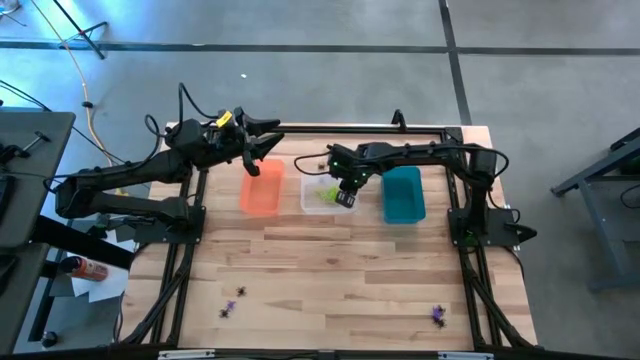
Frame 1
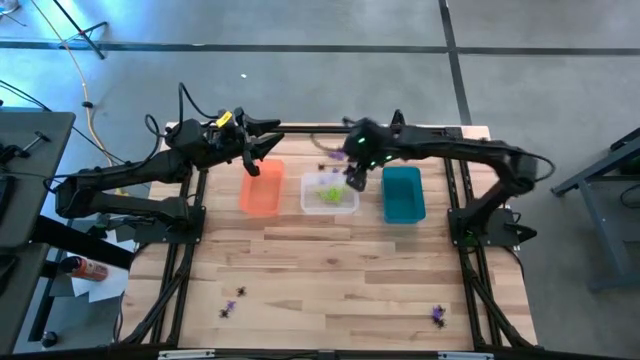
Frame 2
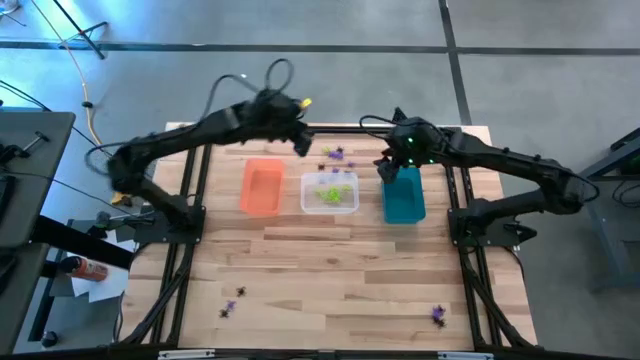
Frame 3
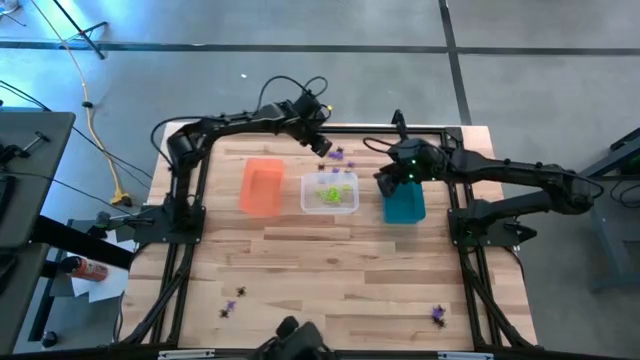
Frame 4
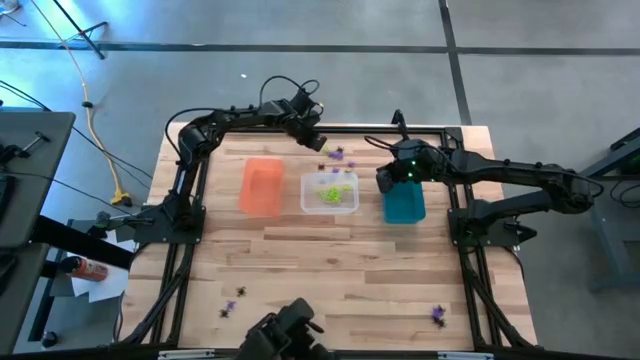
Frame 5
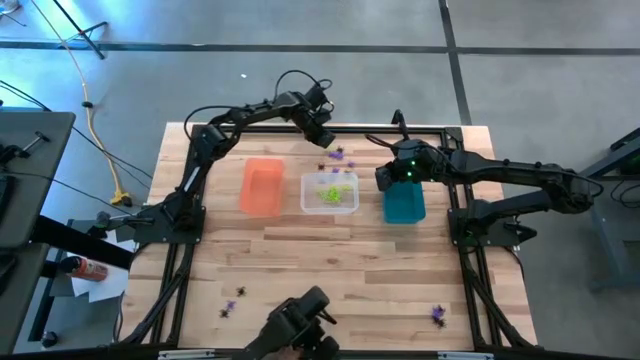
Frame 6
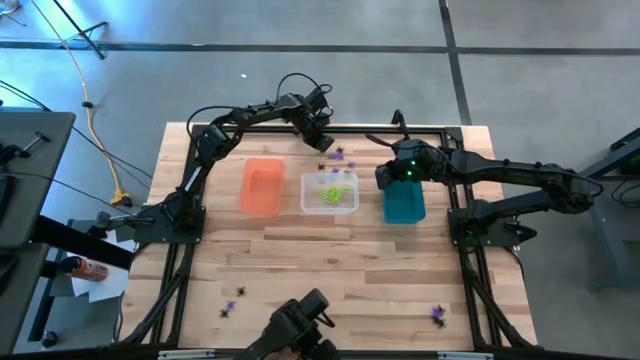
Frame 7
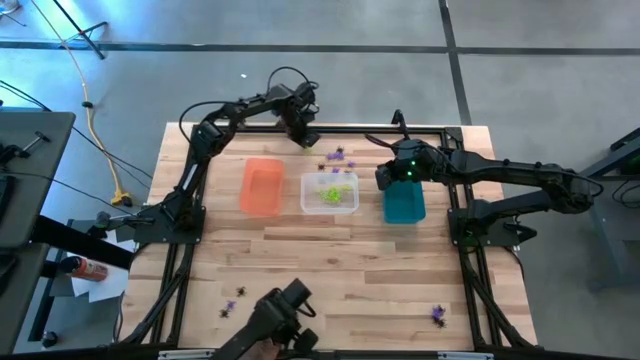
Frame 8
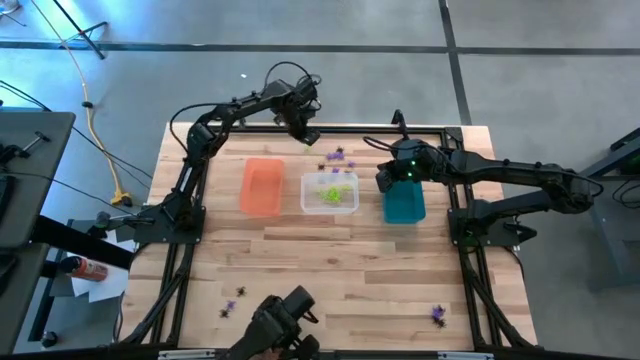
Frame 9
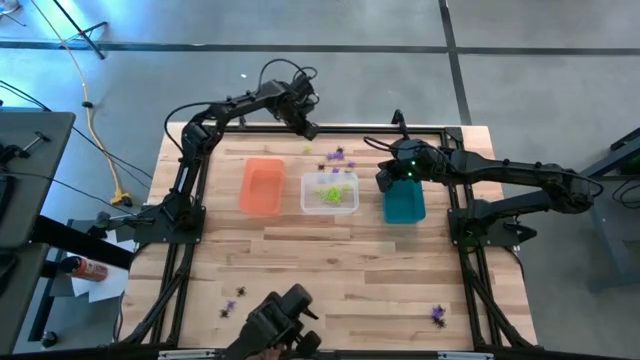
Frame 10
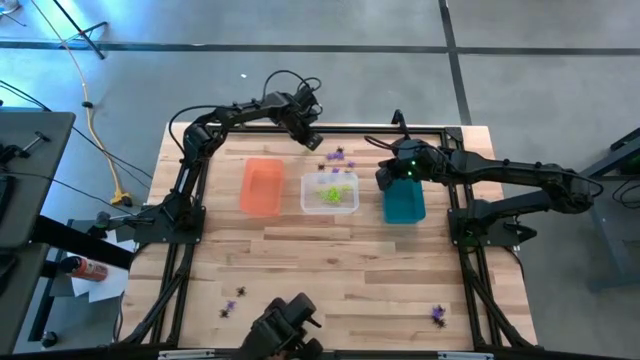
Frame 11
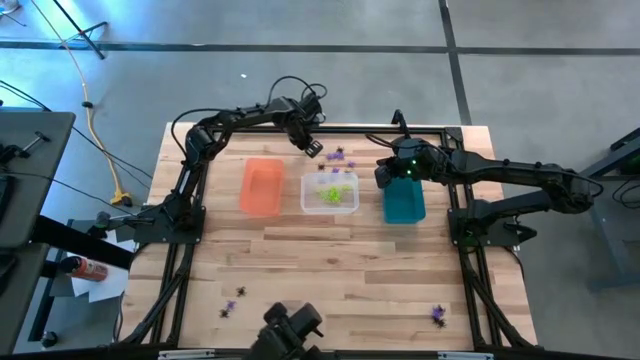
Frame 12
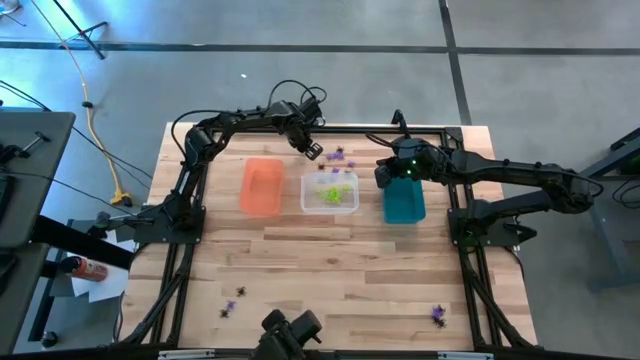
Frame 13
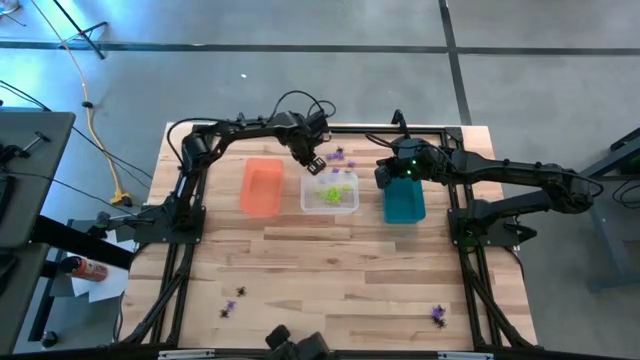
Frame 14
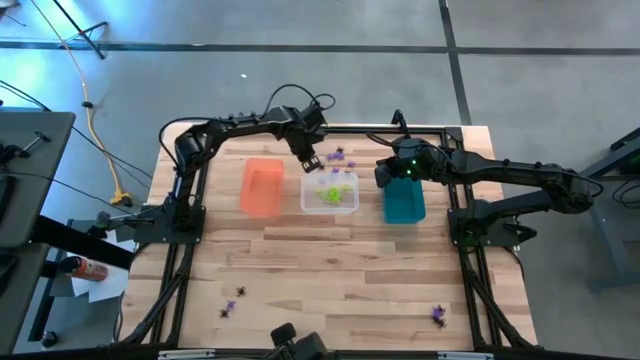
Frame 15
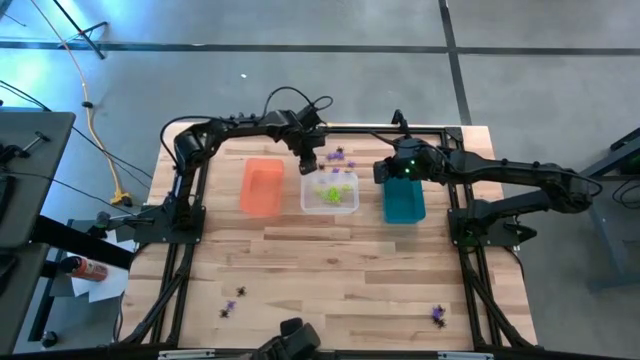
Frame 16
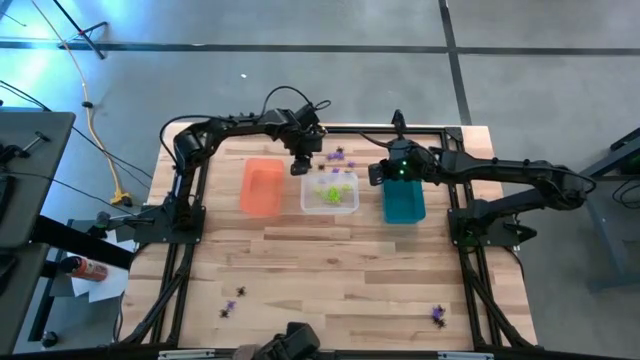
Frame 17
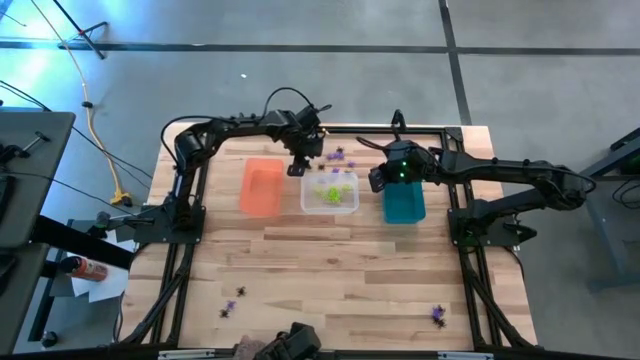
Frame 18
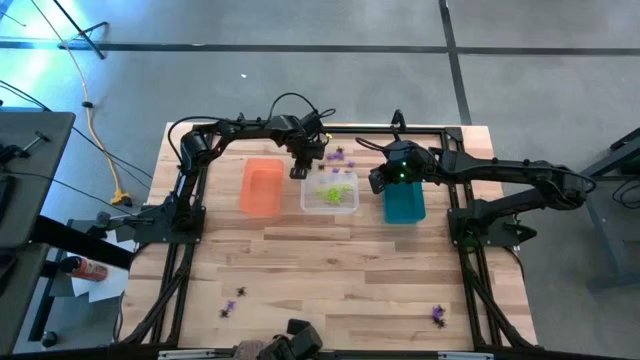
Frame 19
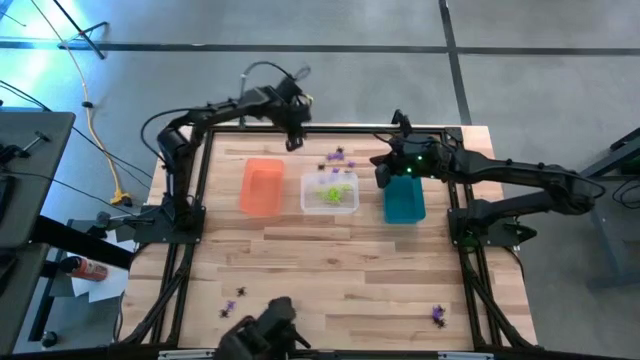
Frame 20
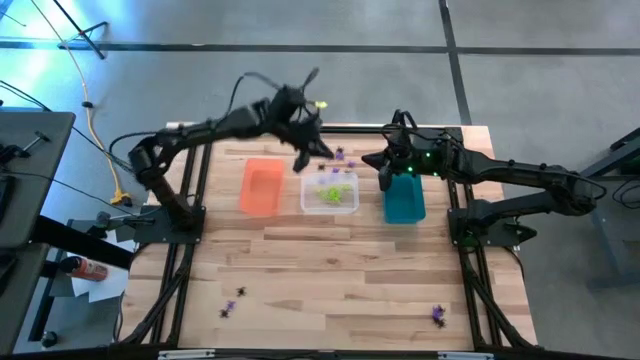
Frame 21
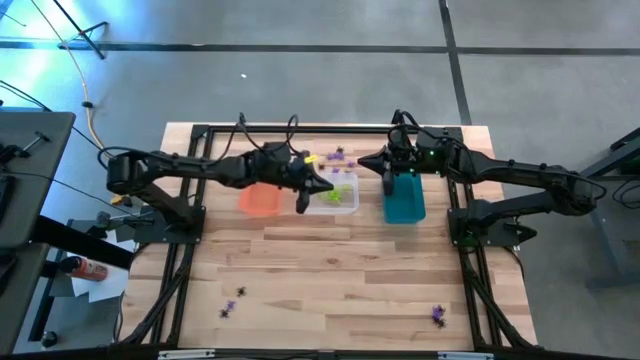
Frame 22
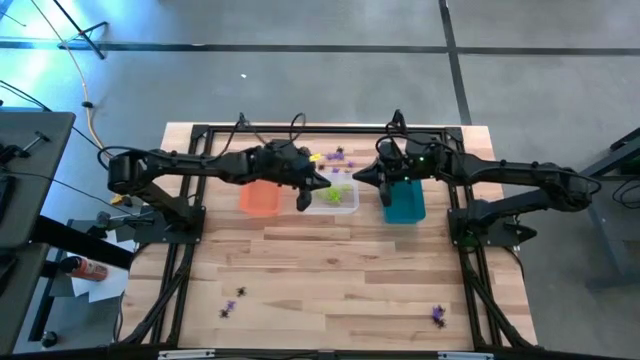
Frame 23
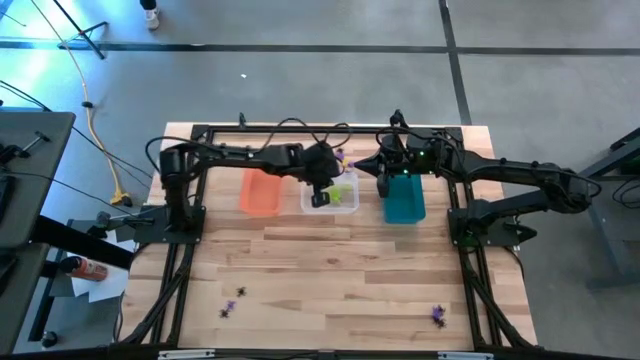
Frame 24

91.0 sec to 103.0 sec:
Task: Sort Halloween decoration
Put the green spider toy into the transparent bin

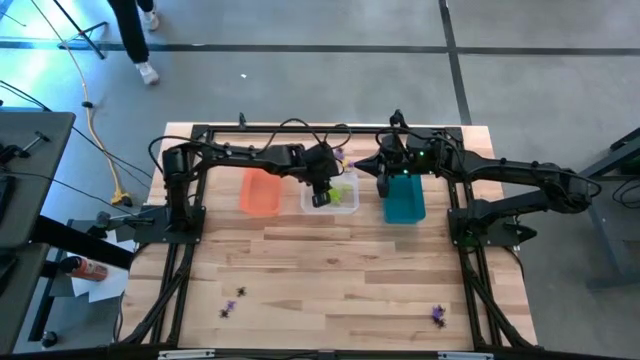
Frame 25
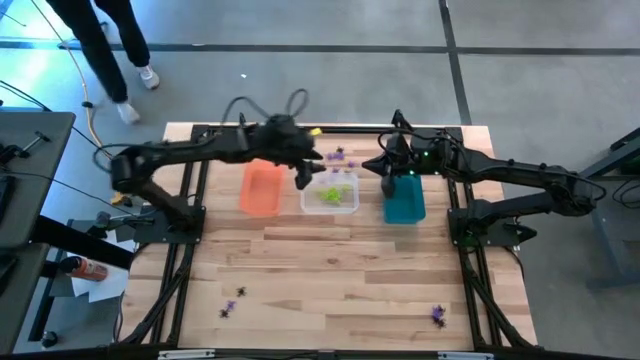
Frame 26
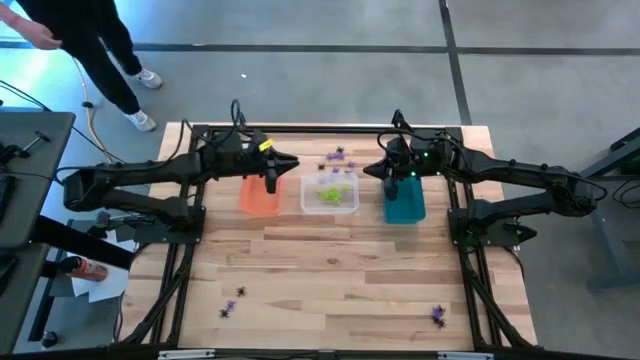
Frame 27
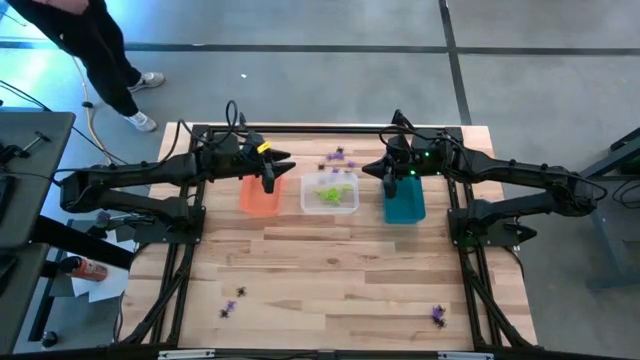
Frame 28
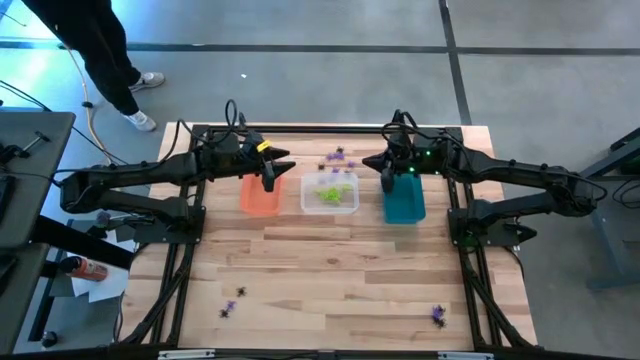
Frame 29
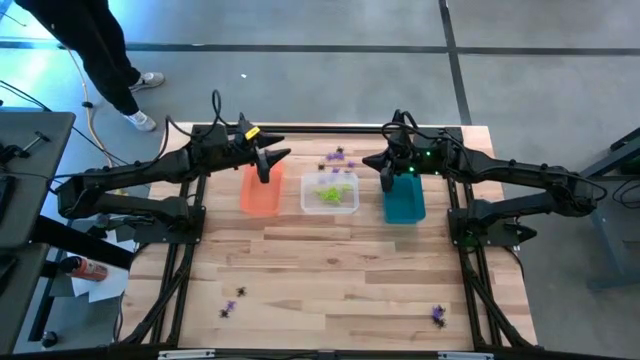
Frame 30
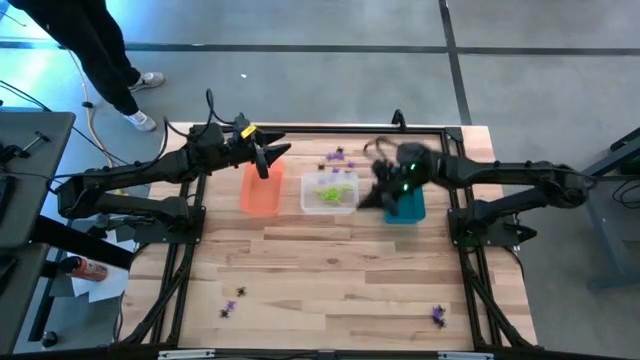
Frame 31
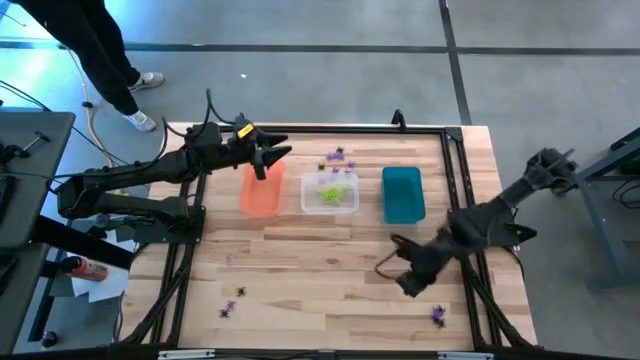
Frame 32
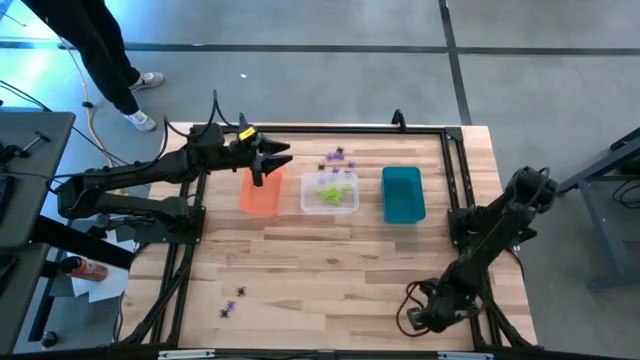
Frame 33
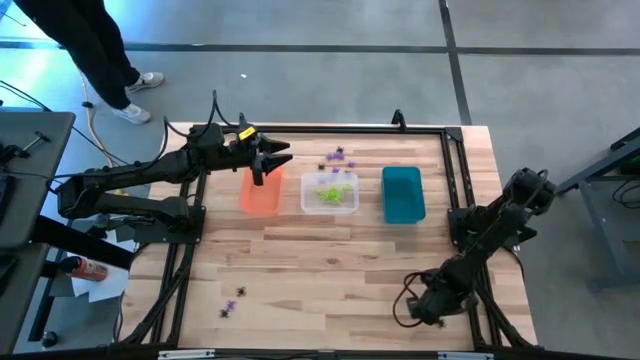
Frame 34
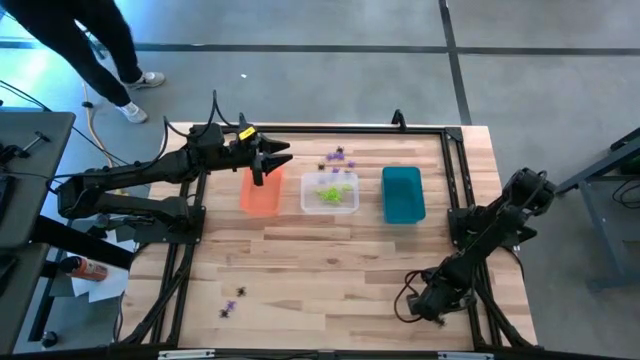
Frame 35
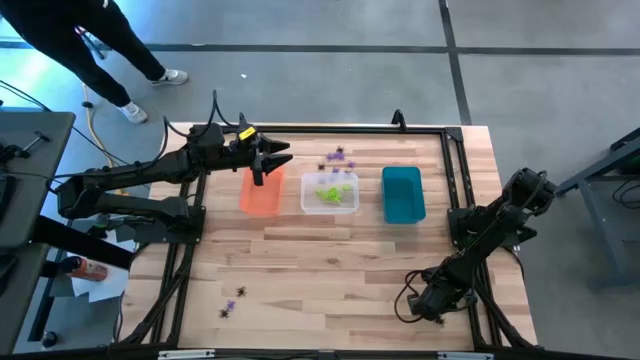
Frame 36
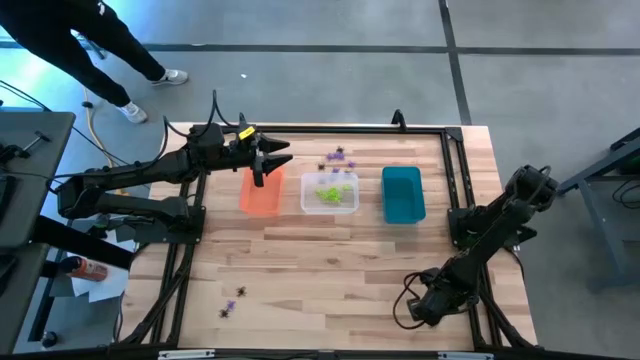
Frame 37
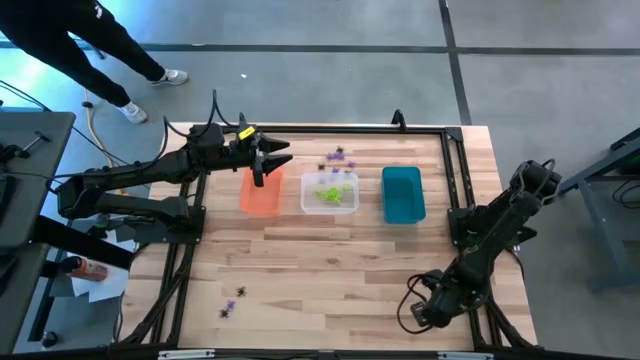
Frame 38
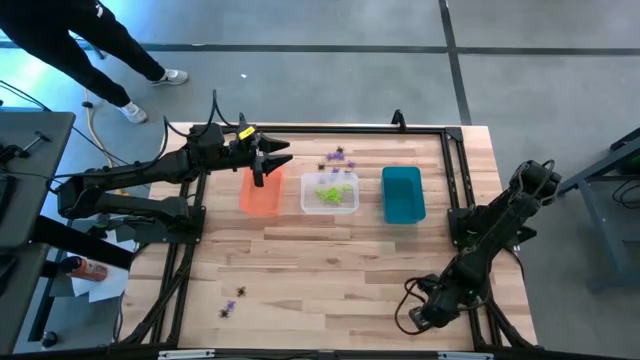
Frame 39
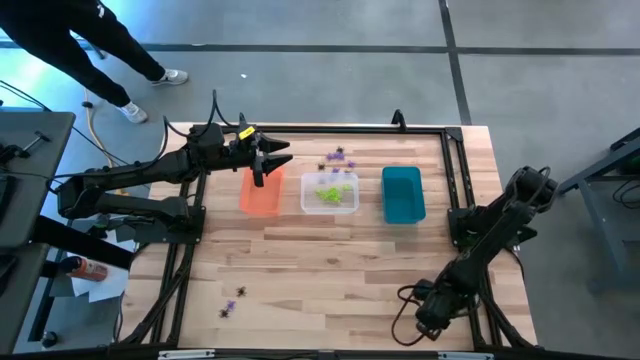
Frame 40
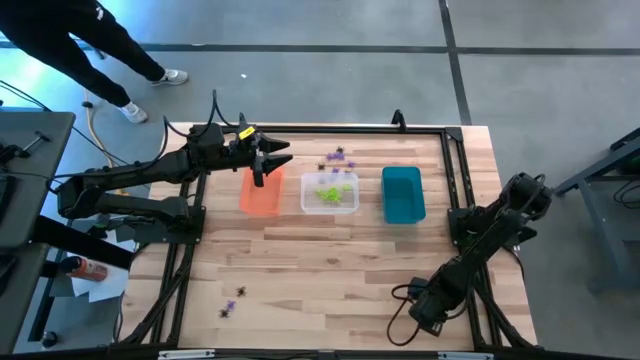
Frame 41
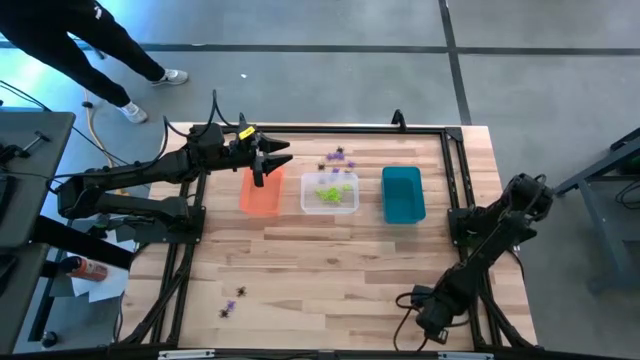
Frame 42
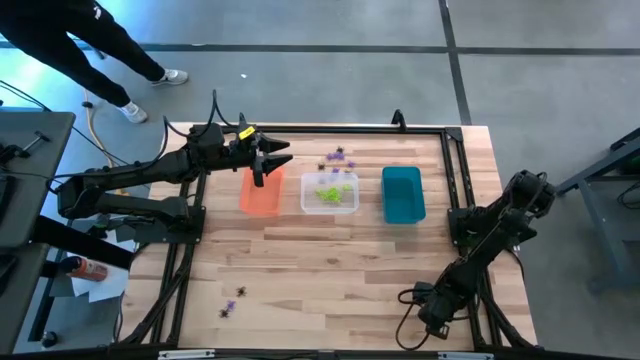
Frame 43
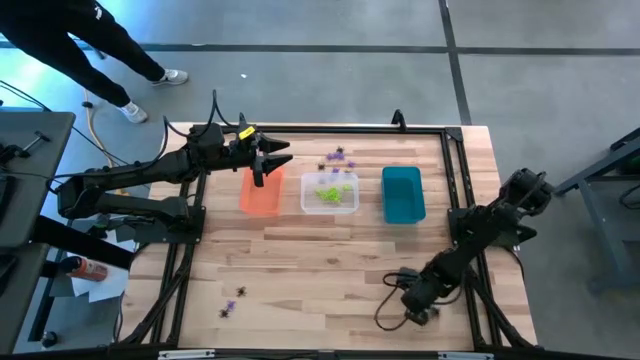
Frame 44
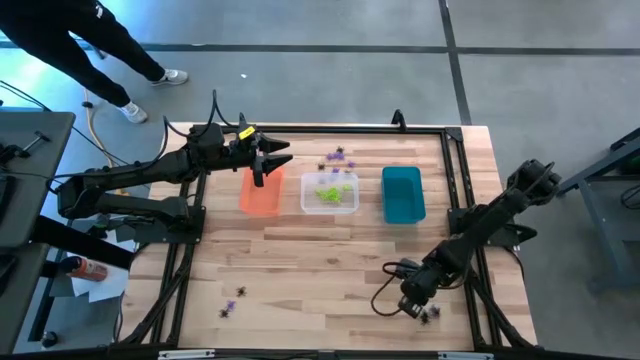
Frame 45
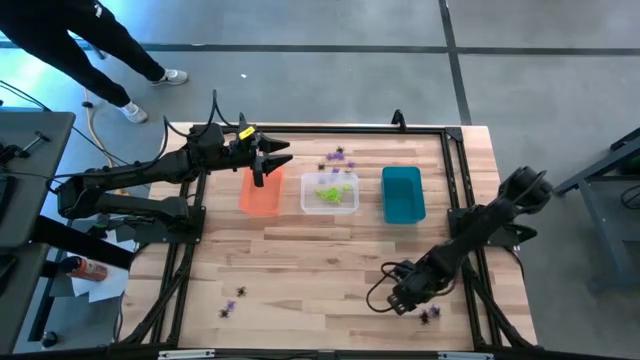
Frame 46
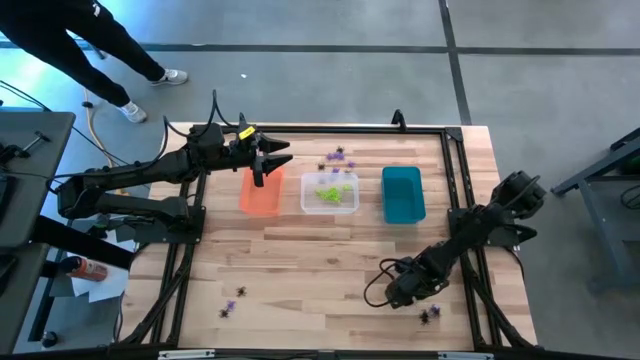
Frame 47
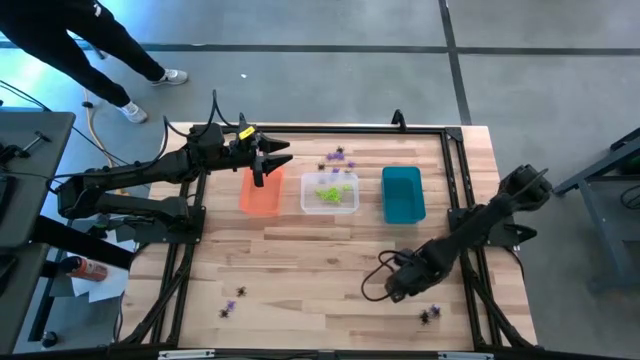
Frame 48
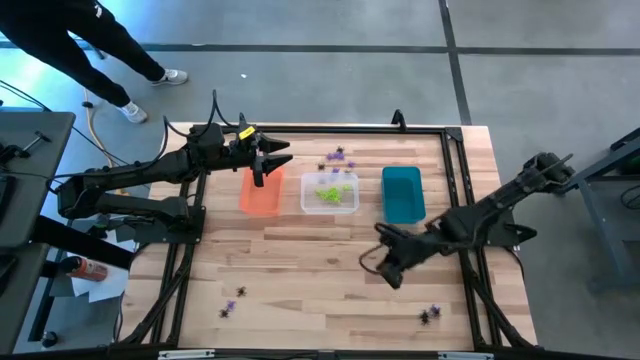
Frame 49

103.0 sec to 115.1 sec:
Put the purple spider toy into the blue bin
